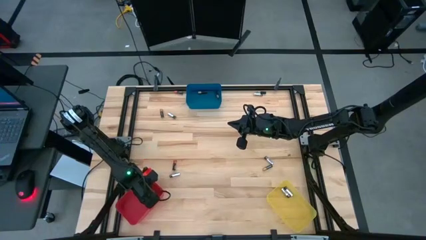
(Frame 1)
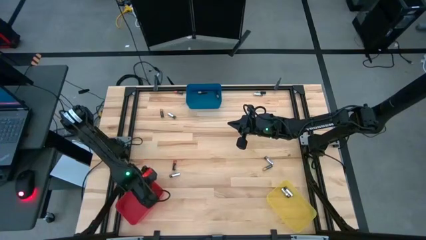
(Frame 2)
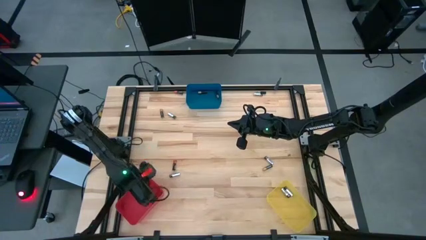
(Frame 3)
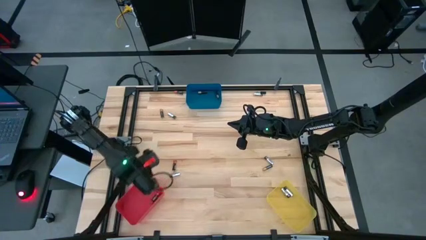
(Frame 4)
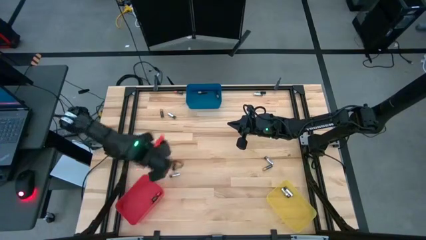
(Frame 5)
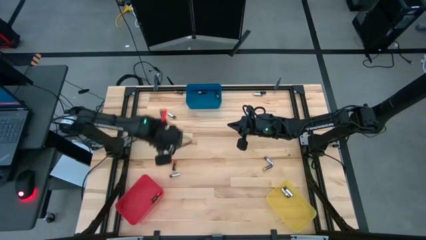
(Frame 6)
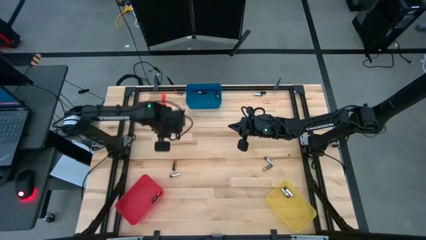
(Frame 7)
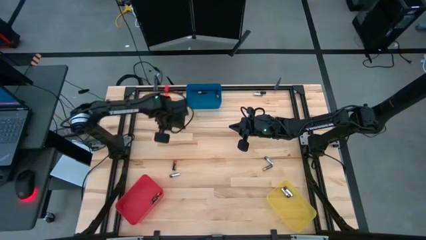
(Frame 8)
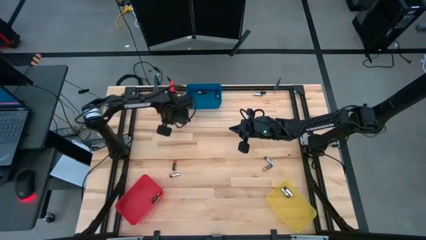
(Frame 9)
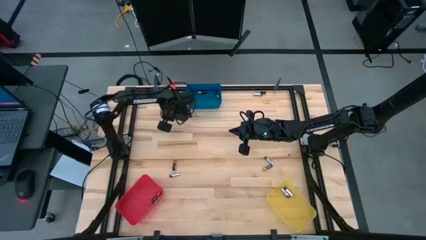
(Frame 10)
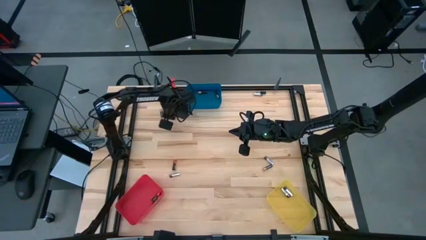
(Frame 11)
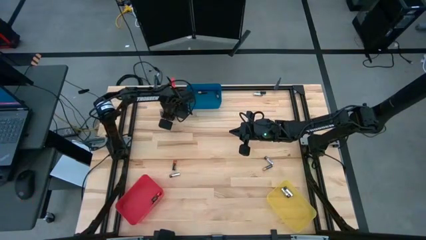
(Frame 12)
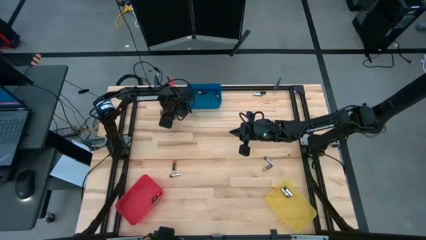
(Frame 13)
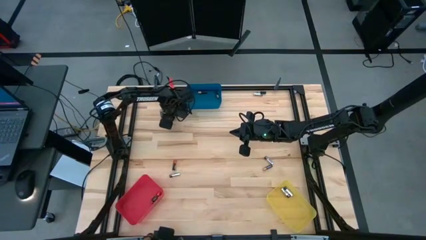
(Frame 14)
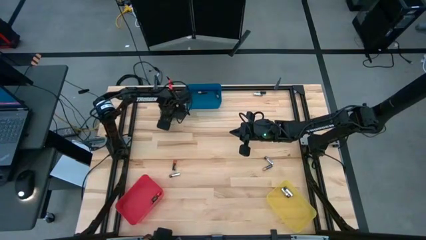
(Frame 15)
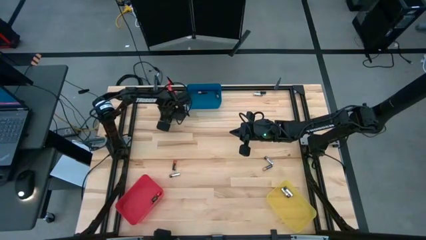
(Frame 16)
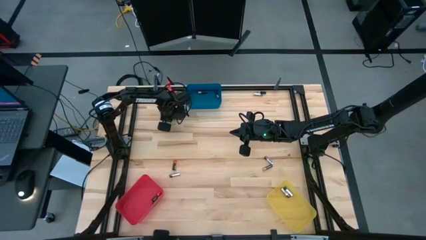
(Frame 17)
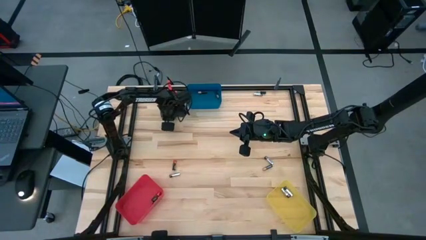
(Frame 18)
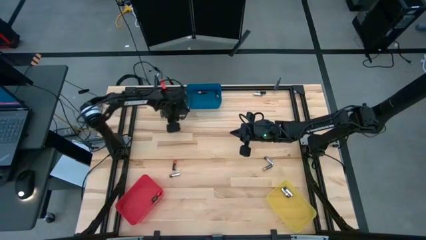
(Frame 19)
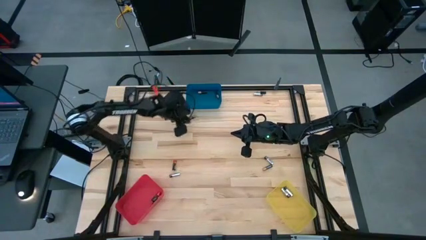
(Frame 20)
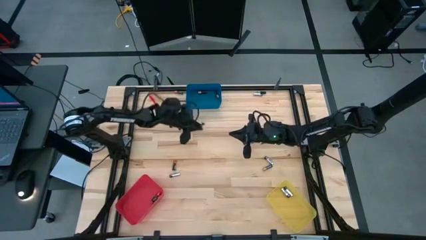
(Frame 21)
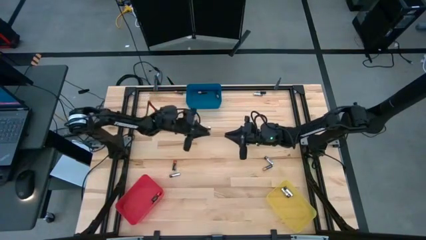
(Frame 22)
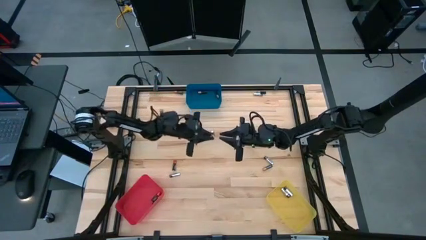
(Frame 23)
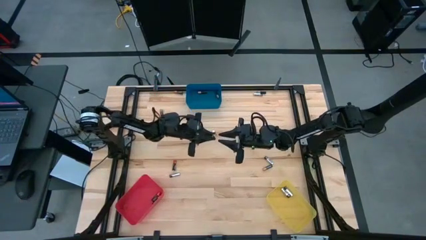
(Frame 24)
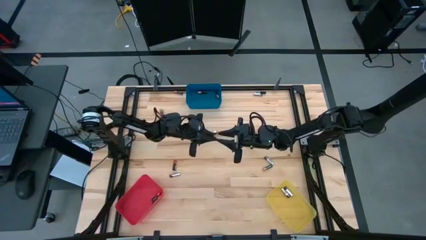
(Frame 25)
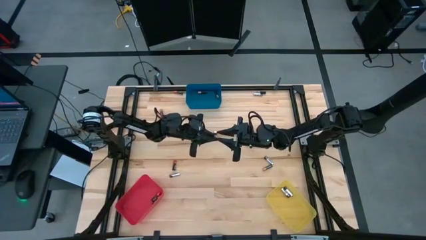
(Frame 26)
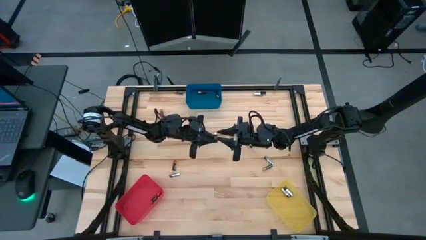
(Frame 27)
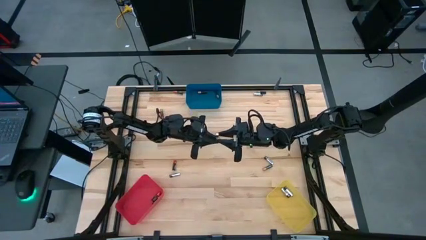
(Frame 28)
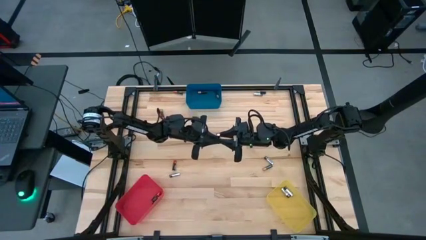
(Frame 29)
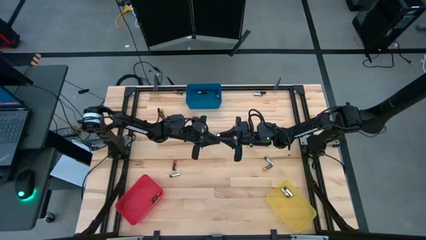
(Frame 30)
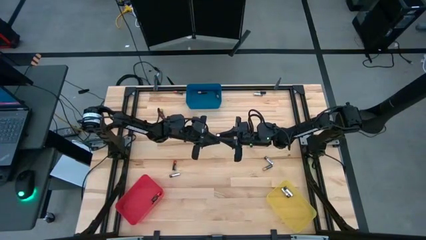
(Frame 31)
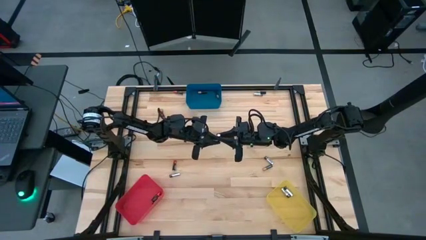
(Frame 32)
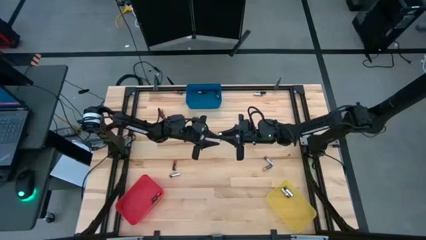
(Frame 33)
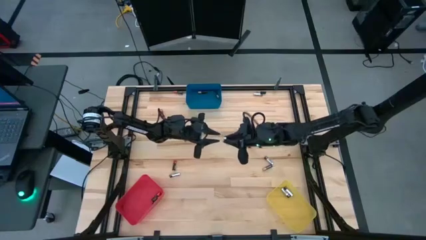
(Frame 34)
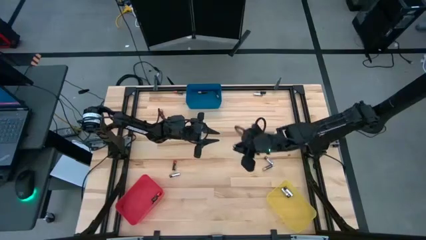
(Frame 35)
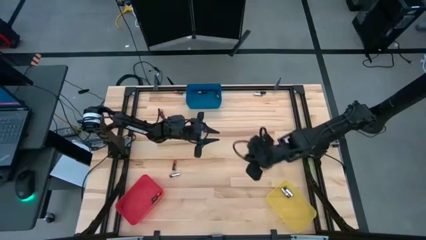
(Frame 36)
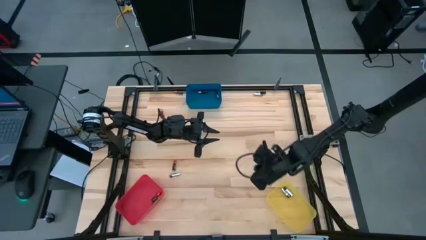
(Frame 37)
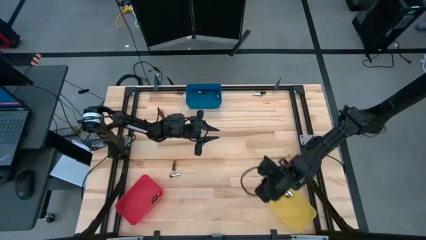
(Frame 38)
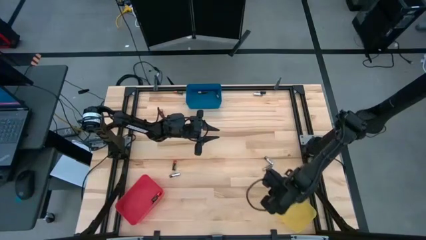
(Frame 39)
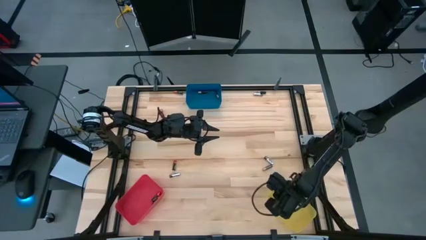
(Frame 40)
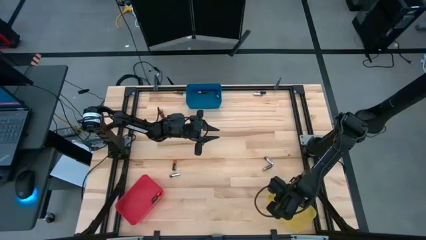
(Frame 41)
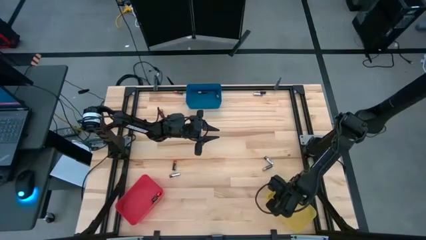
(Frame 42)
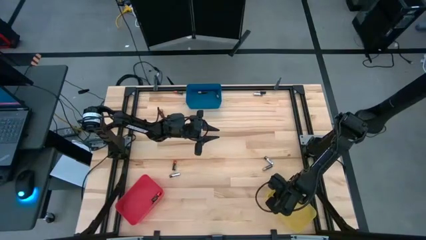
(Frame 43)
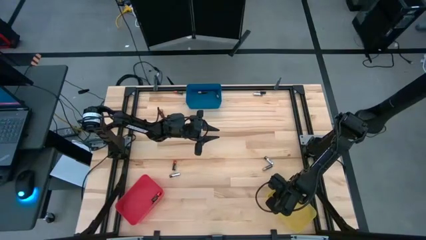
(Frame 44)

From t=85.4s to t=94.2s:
Task: Sort batteries
Put the silver battery into the yellow bin

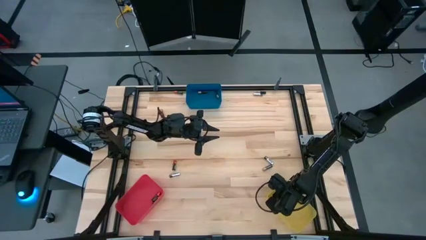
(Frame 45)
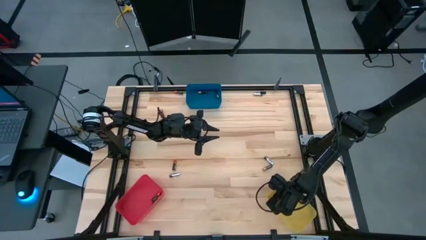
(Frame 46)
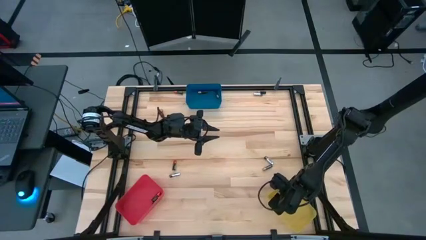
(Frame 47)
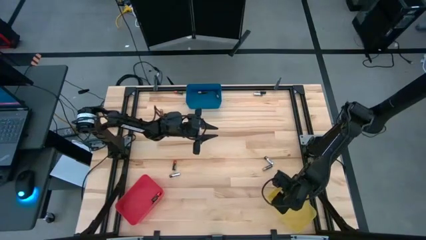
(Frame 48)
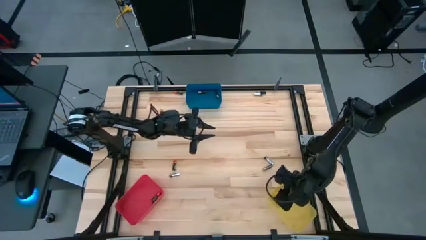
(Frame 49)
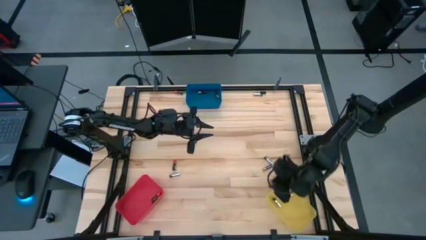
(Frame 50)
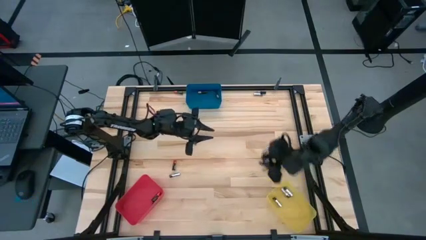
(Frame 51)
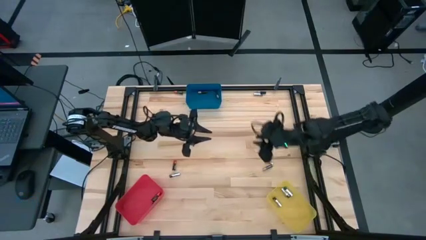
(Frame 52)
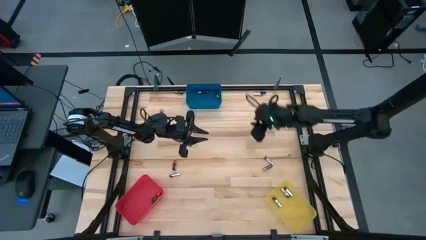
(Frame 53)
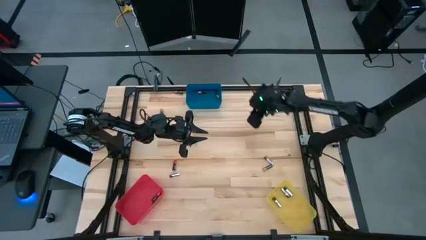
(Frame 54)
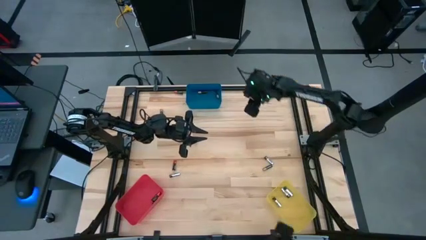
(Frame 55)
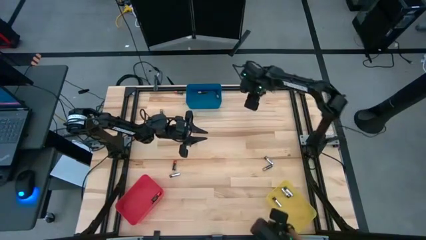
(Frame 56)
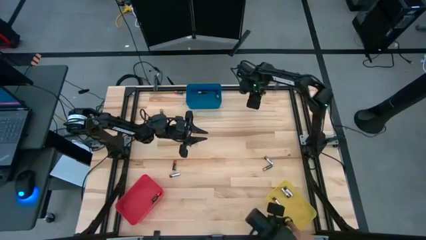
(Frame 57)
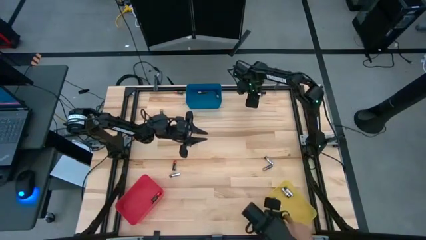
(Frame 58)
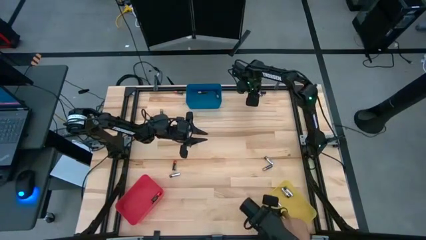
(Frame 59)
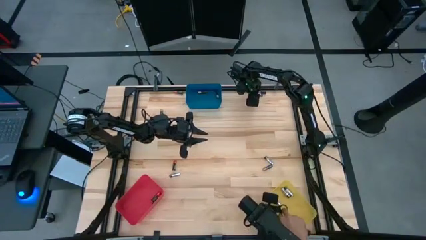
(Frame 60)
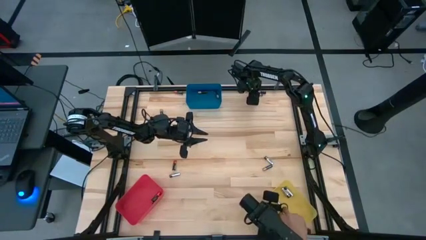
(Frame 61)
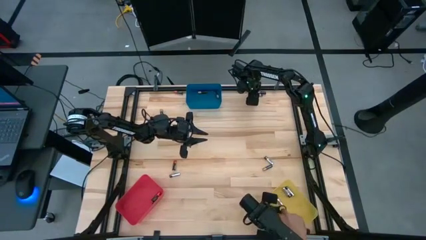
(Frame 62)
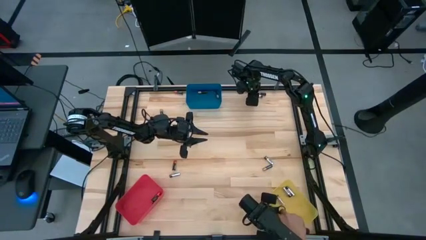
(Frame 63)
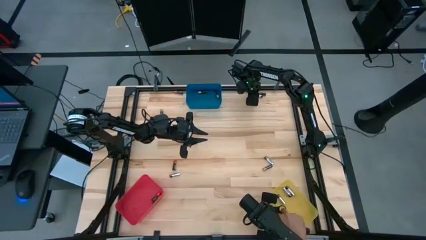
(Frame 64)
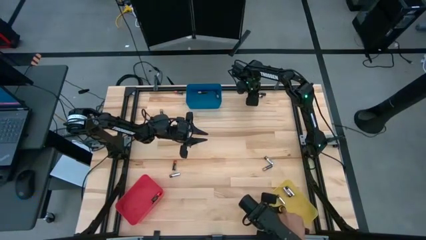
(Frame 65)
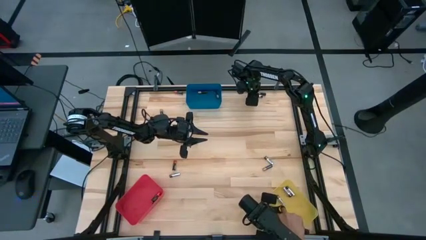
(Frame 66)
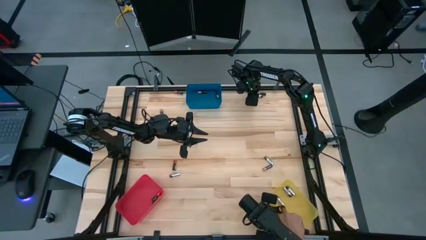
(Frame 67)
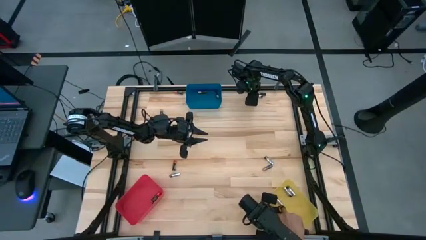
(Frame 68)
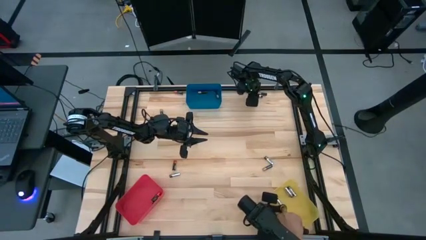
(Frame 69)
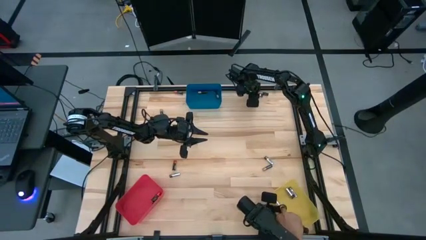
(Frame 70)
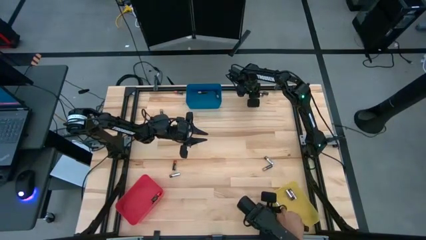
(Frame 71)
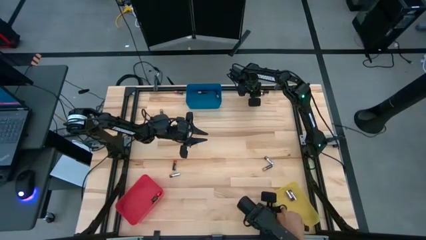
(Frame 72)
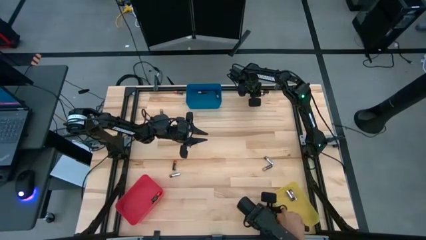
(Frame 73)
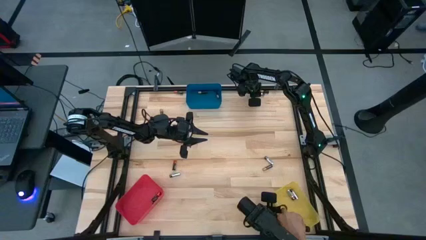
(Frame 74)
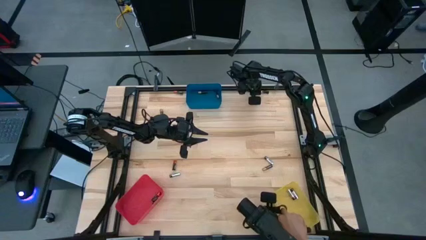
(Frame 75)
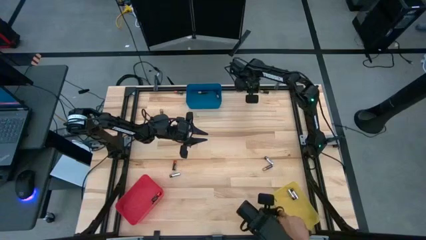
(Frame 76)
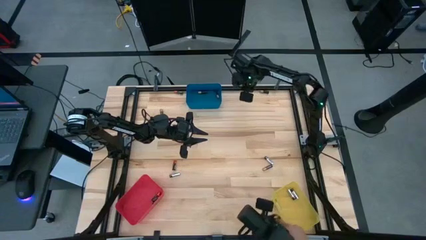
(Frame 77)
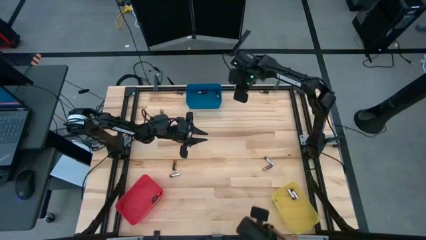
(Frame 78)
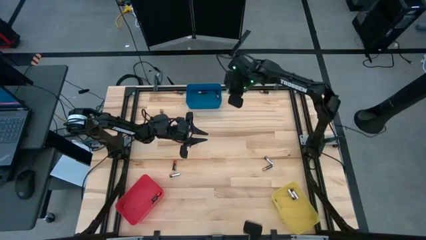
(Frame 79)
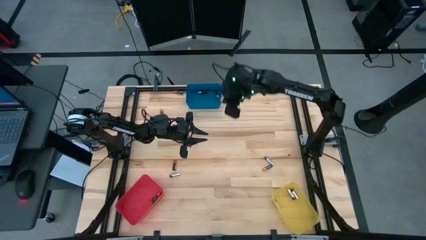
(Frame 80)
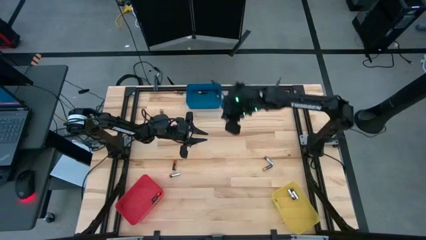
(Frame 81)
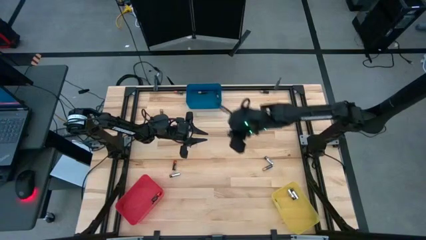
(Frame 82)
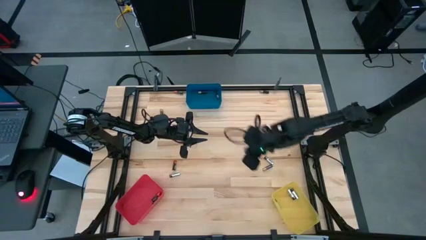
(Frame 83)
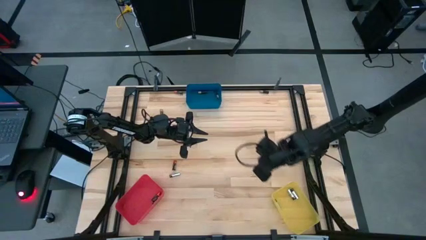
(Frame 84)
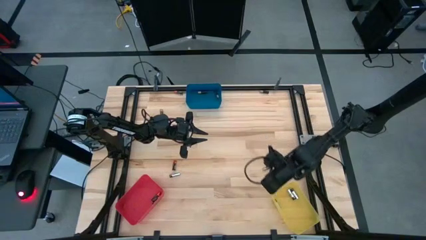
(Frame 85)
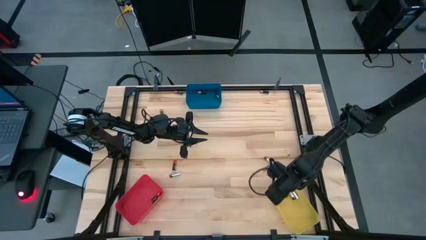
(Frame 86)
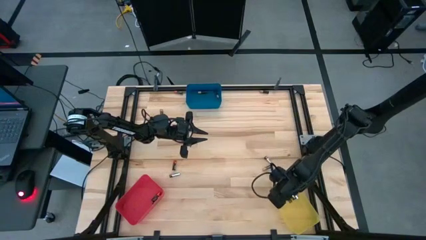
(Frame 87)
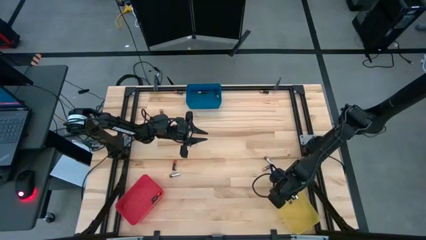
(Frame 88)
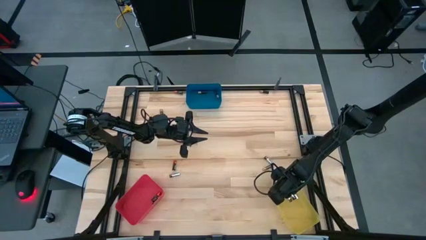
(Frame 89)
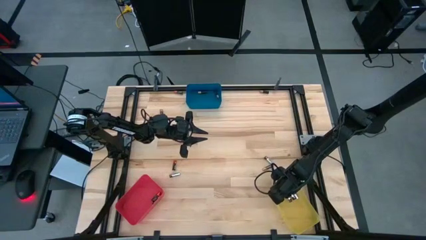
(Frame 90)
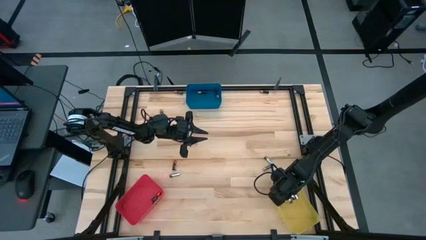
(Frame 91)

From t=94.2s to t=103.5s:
Put the silver battery into the yellow bin
